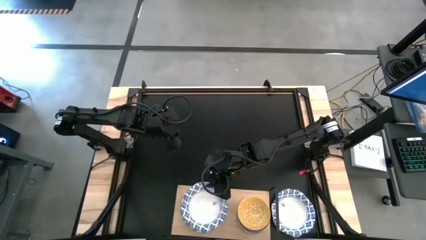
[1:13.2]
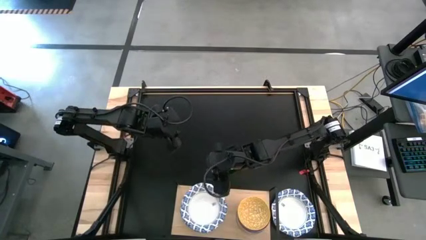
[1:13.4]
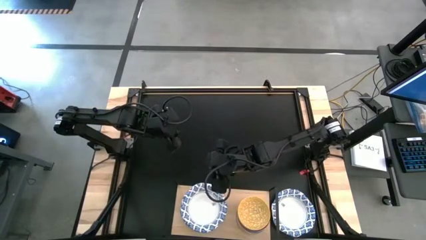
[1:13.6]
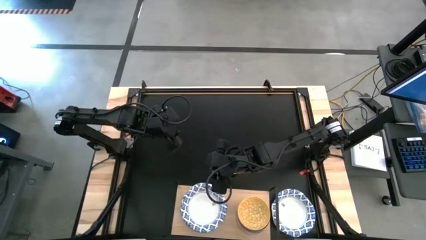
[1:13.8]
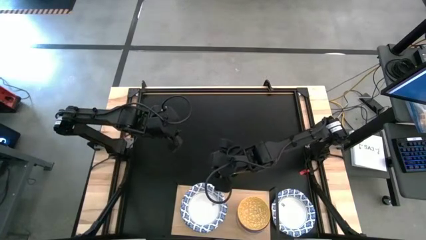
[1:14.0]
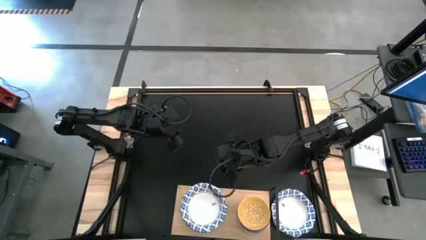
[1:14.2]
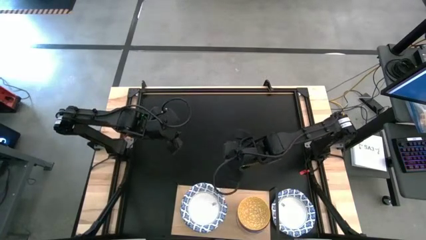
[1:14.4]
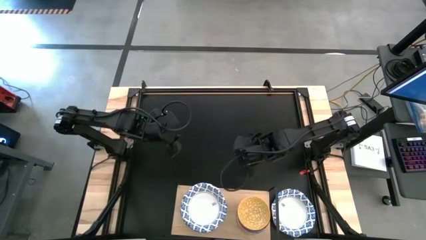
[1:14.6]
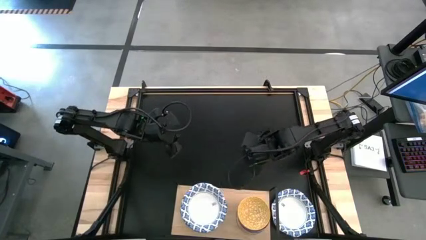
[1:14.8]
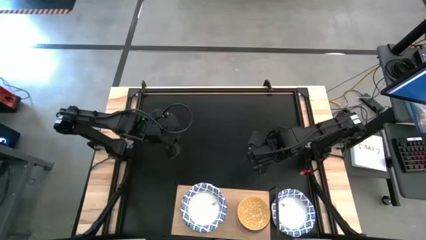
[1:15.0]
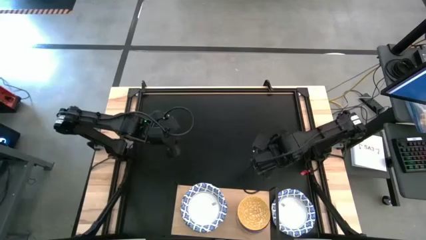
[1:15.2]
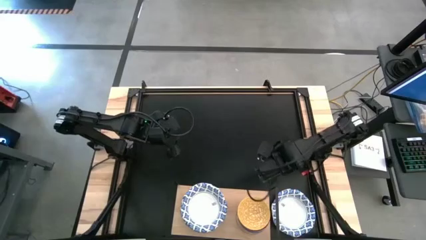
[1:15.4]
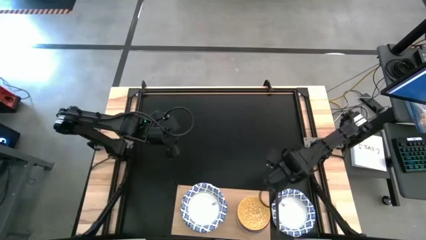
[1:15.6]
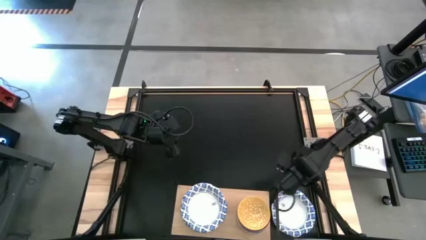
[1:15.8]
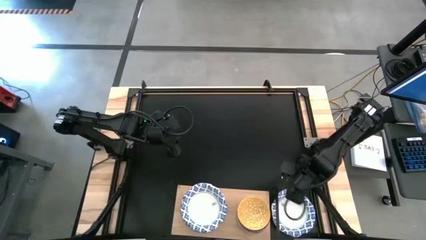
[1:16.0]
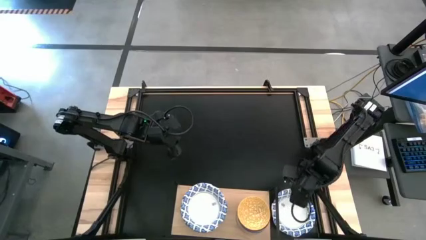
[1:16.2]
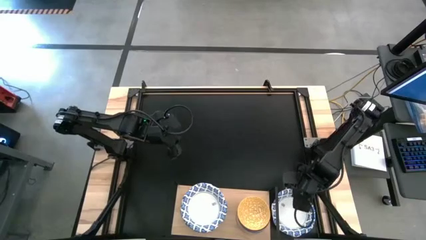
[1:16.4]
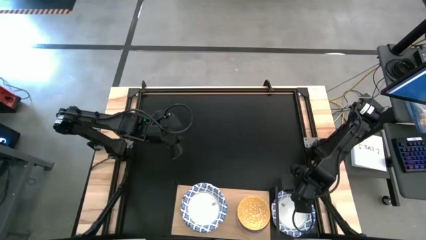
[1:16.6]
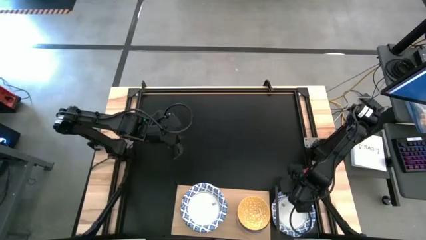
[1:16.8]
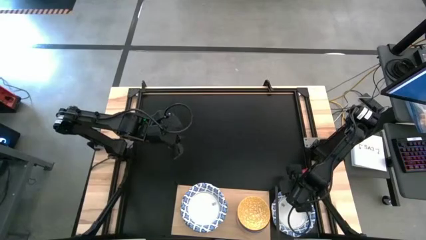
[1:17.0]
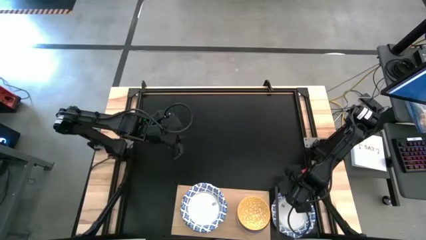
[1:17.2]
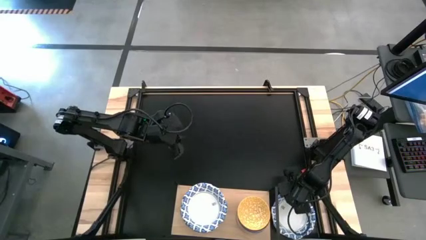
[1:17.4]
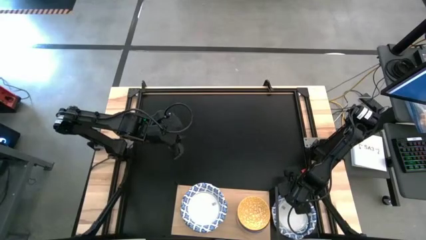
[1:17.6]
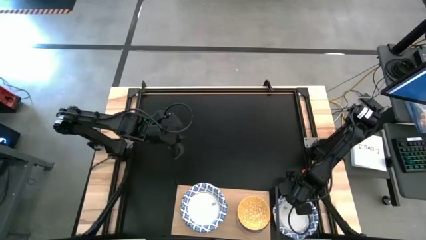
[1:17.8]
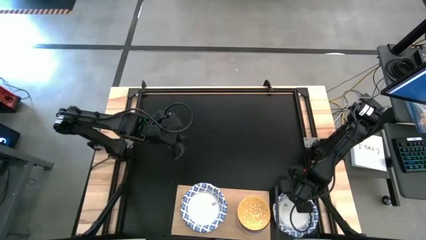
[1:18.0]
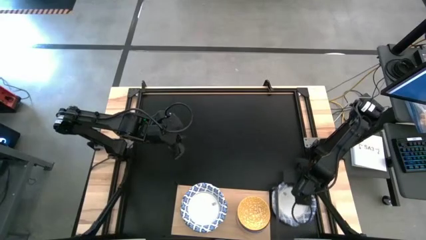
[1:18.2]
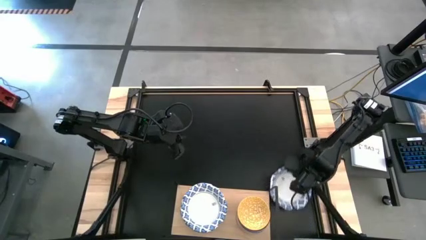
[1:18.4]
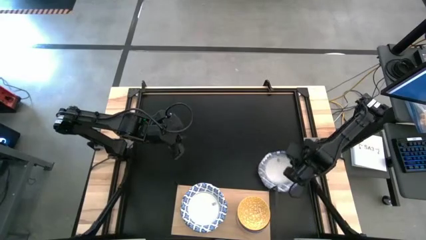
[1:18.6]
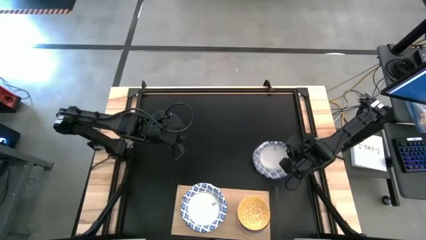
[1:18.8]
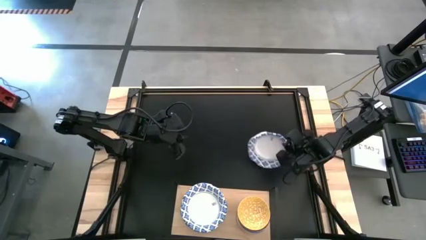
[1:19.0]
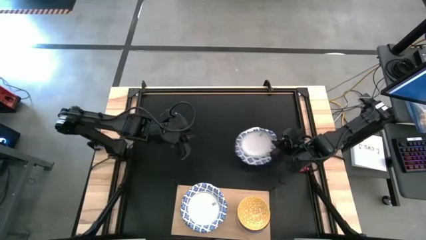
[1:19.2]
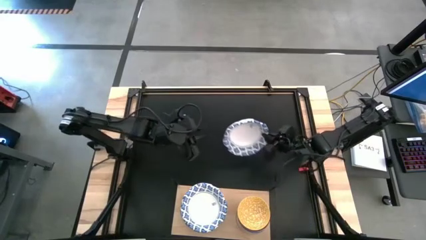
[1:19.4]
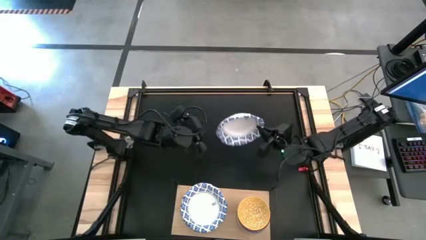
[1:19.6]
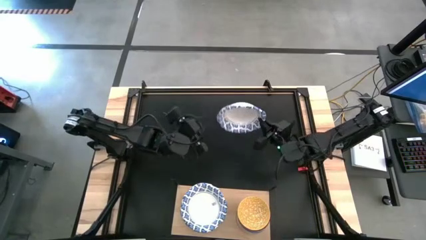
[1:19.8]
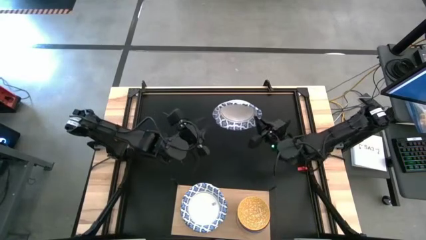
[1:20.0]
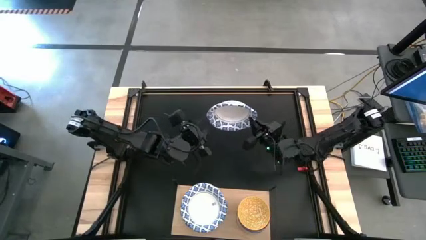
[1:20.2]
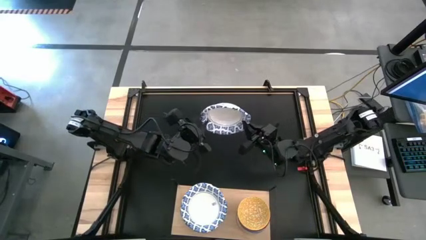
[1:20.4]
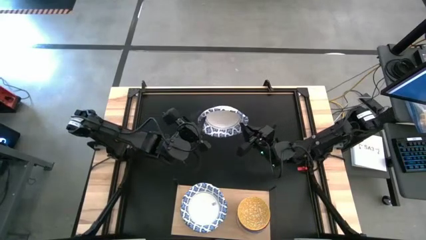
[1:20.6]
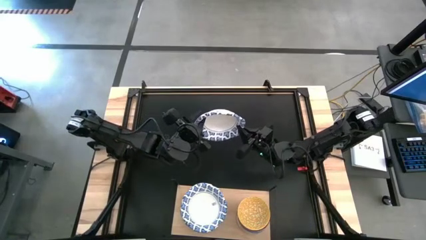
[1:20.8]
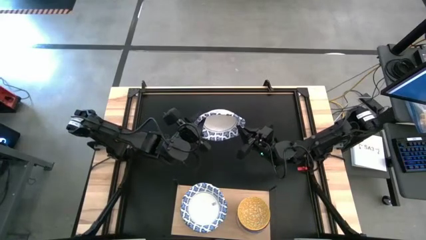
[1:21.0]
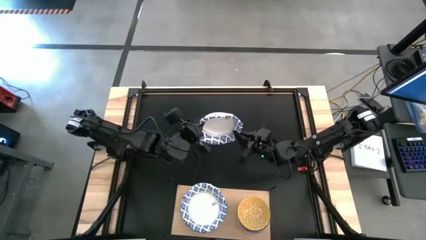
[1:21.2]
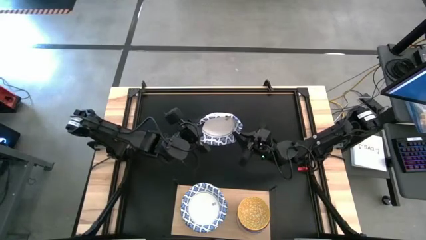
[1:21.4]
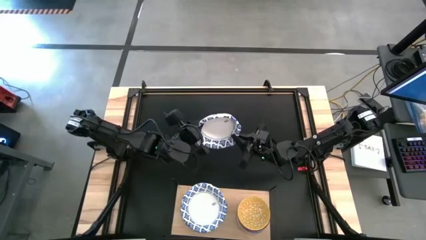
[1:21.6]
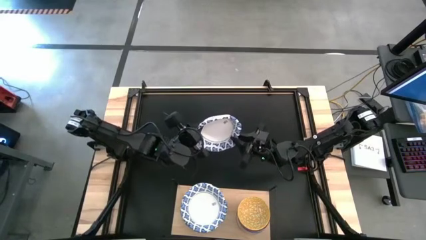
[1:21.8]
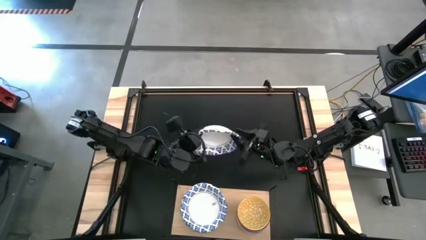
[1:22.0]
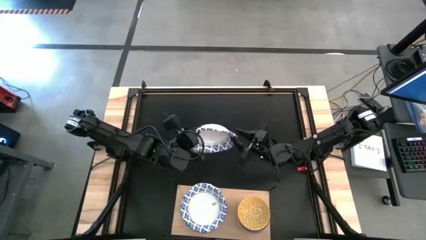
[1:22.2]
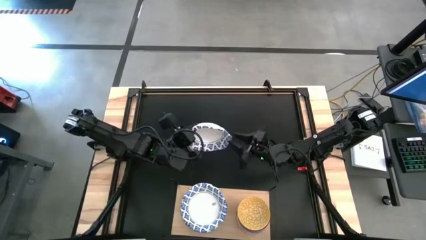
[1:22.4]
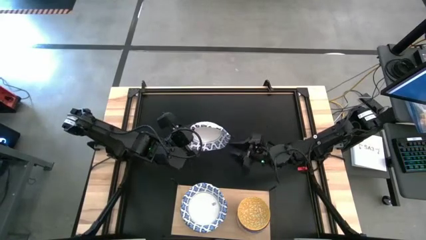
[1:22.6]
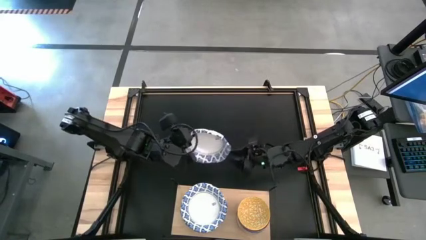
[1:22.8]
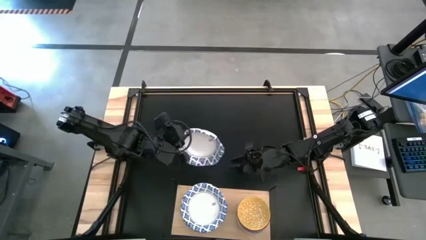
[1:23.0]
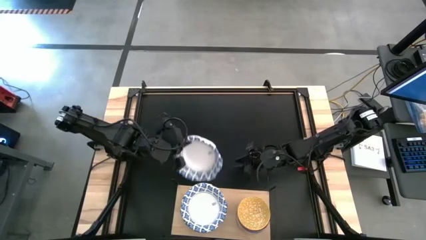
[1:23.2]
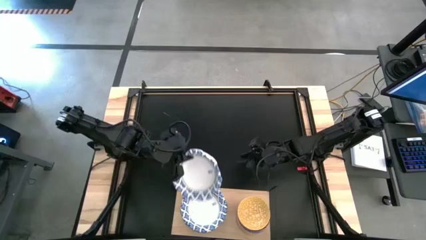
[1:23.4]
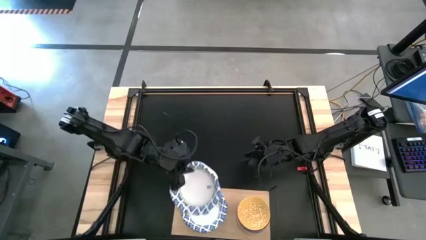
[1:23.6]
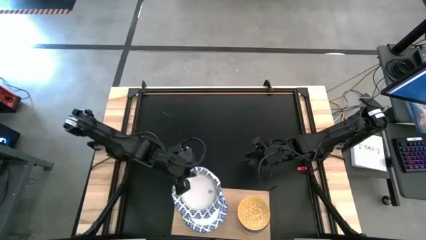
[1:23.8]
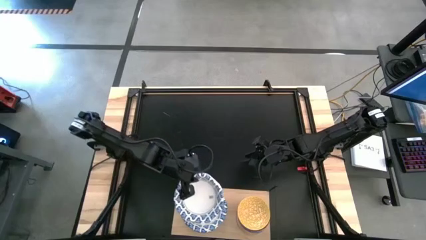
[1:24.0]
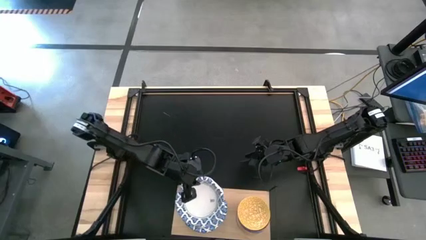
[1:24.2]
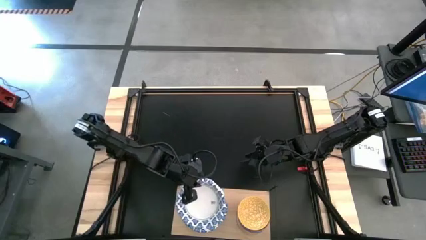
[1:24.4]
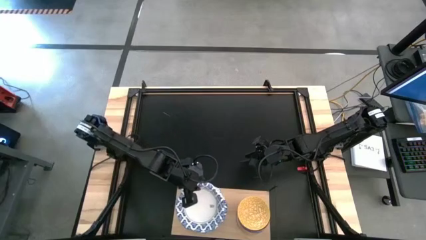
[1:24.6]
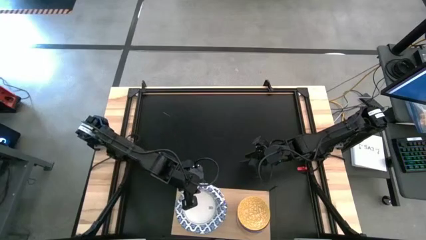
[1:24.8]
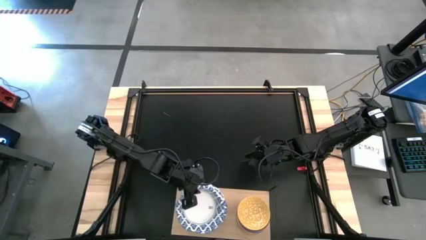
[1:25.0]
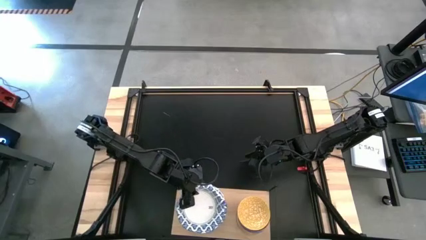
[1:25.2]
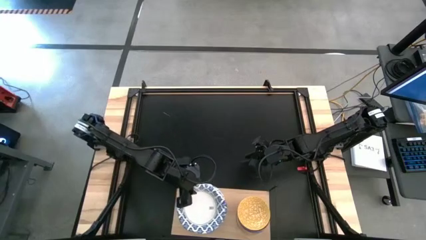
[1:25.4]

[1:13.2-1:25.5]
Task: Place and stack bowls onto a shelf
Stack the large white bowl on top of the large white bowl on the shelf

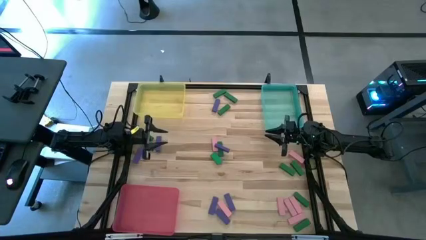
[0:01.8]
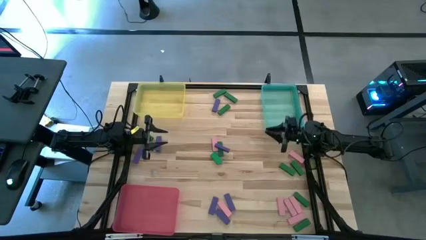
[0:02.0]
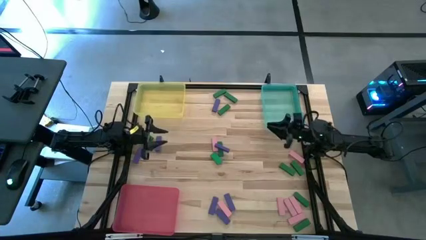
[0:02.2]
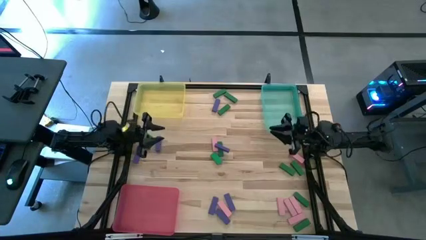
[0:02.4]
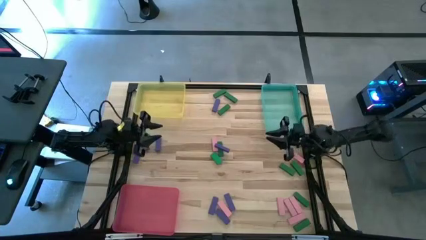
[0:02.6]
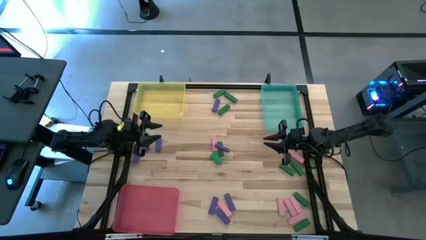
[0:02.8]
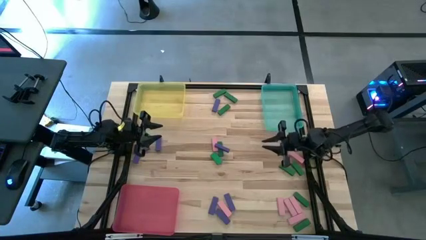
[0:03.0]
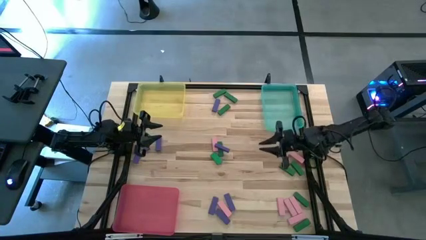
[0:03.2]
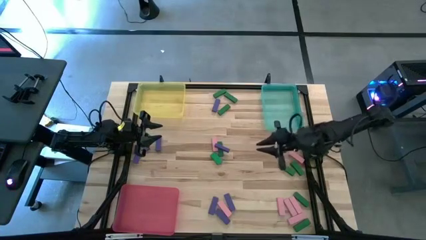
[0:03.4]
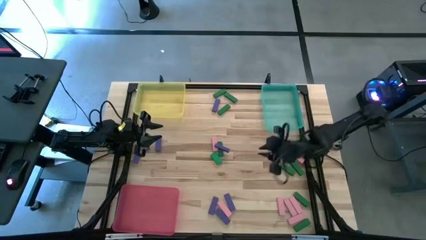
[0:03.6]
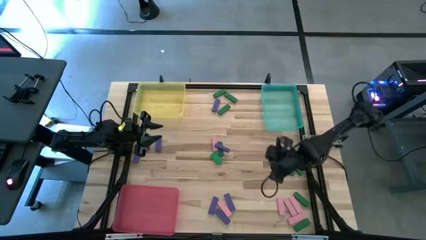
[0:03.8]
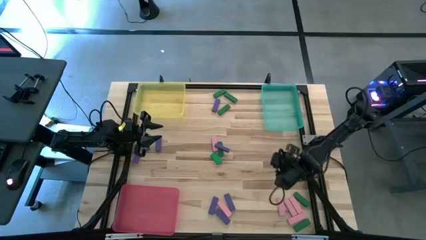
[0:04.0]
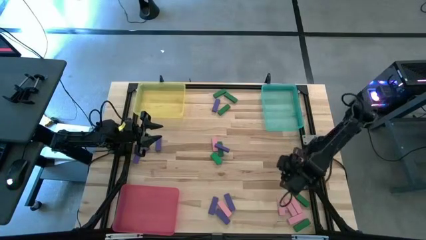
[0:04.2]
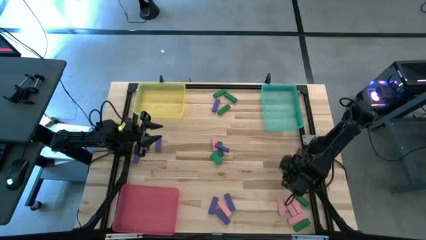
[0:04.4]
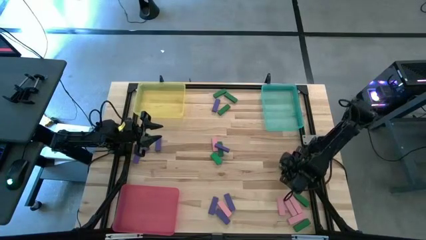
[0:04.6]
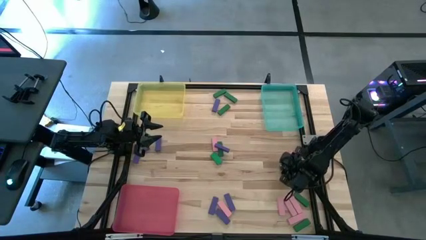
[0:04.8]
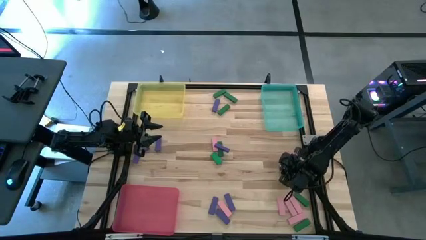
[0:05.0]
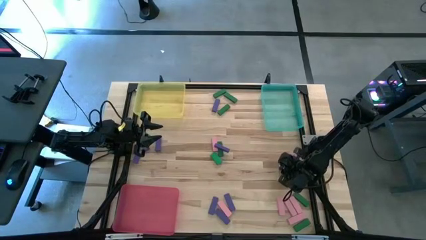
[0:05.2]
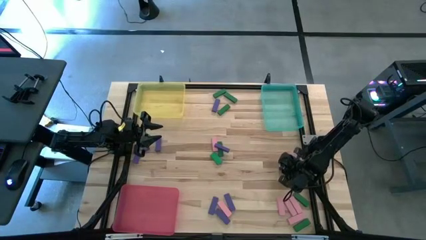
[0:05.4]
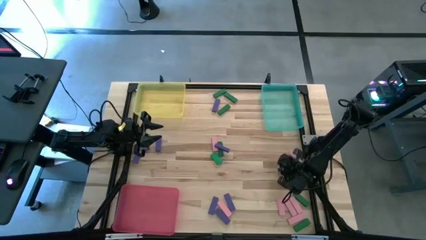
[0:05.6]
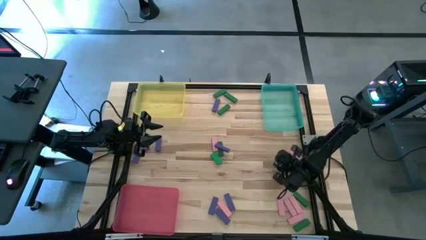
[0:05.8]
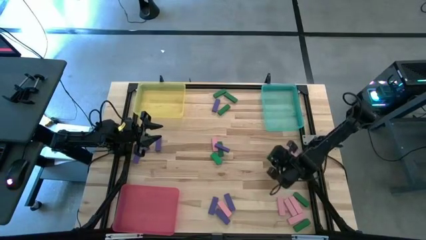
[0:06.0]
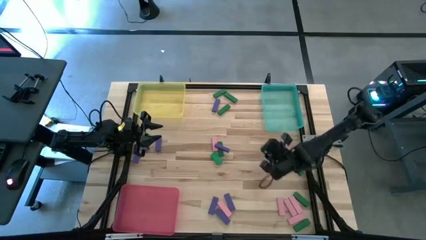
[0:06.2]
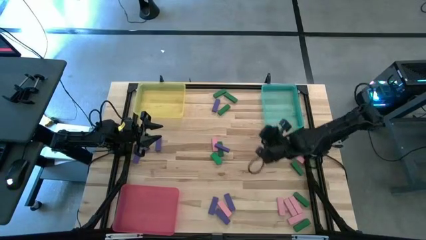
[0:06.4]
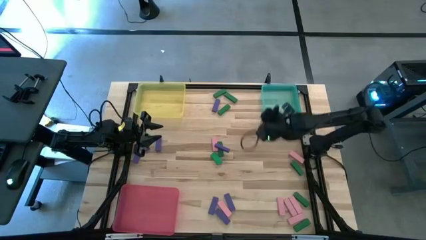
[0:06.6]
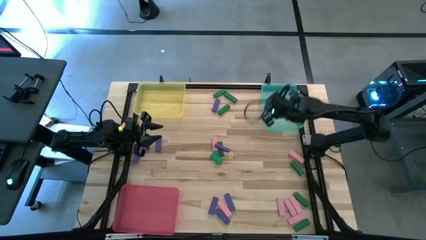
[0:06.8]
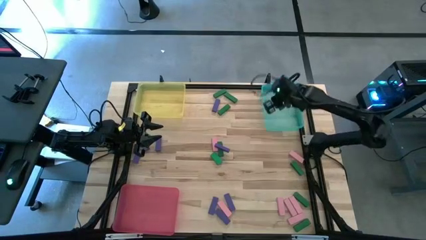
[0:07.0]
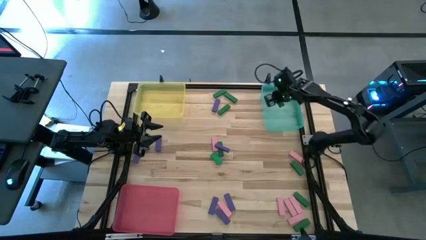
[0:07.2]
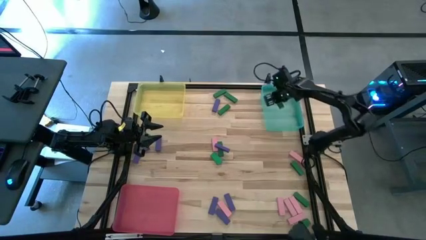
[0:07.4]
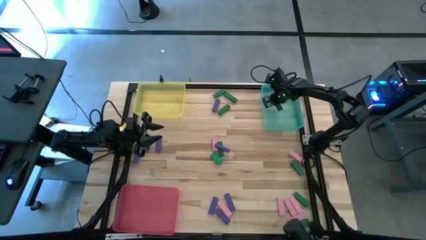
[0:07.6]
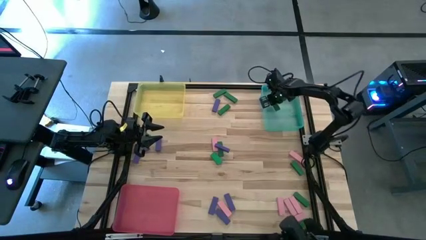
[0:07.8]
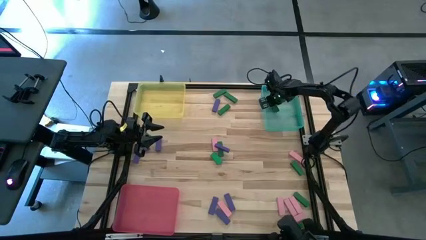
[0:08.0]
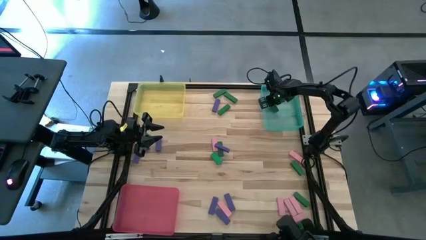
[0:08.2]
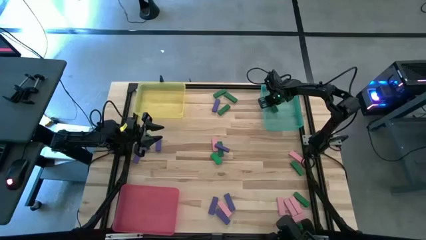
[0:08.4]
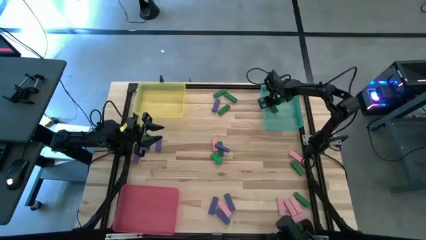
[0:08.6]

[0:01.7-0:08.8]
Task: Sort blocks
Put the green wooden block into the green bin
